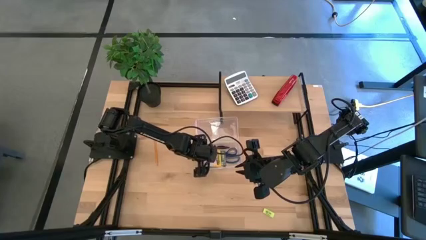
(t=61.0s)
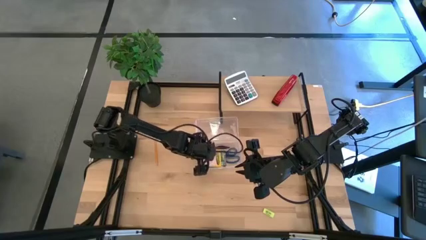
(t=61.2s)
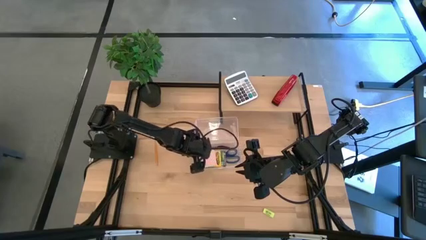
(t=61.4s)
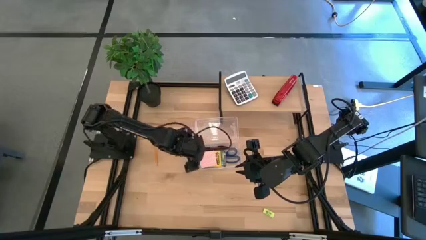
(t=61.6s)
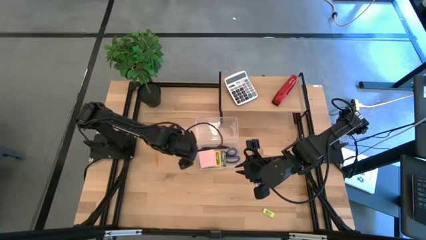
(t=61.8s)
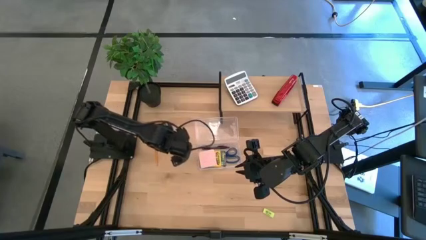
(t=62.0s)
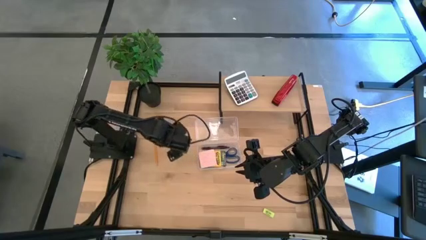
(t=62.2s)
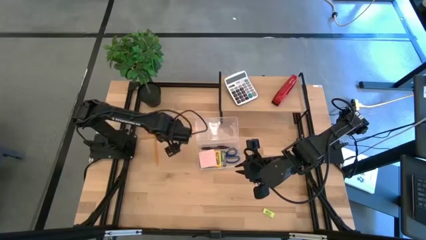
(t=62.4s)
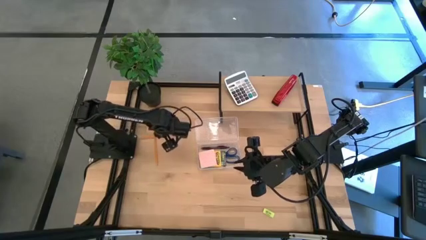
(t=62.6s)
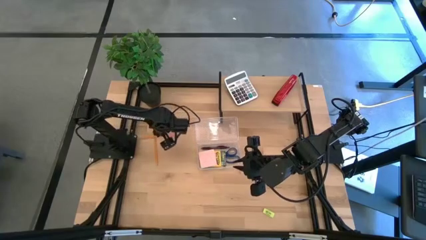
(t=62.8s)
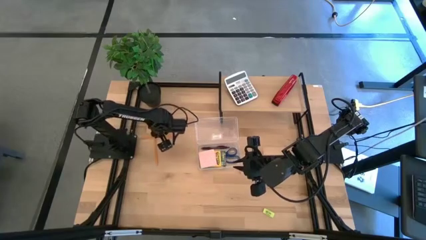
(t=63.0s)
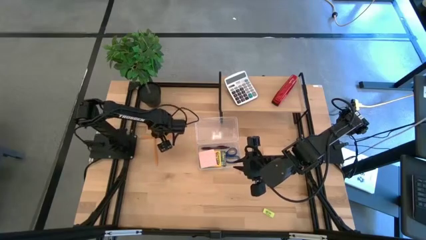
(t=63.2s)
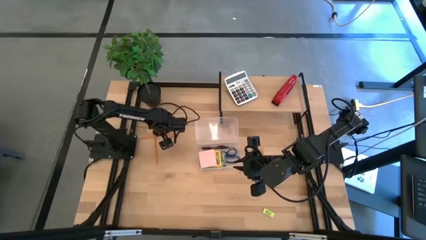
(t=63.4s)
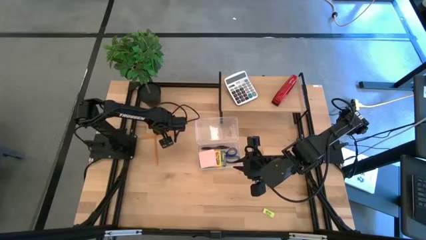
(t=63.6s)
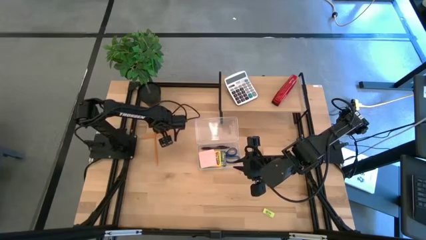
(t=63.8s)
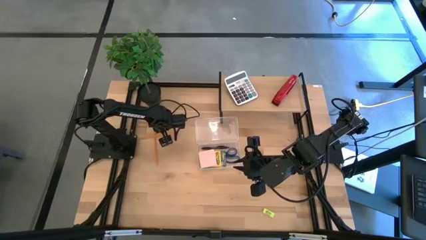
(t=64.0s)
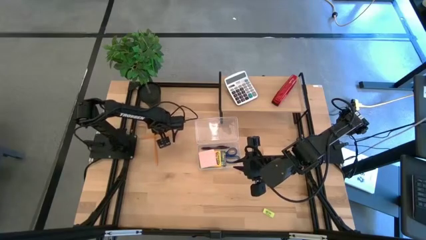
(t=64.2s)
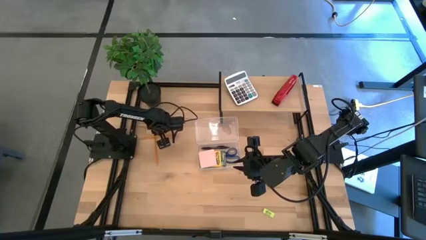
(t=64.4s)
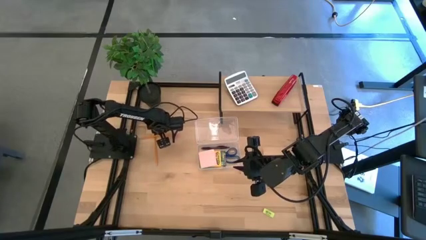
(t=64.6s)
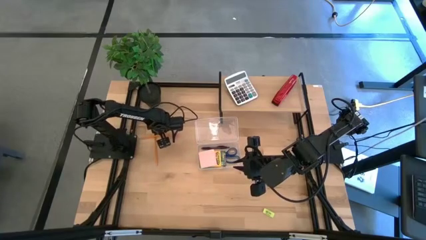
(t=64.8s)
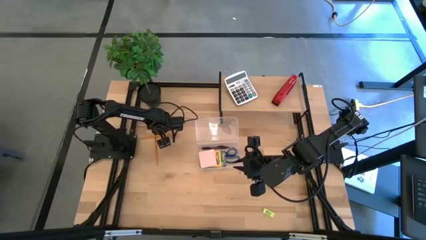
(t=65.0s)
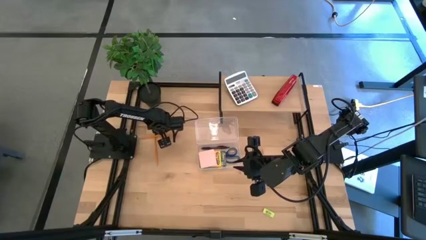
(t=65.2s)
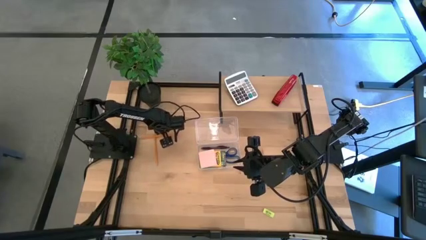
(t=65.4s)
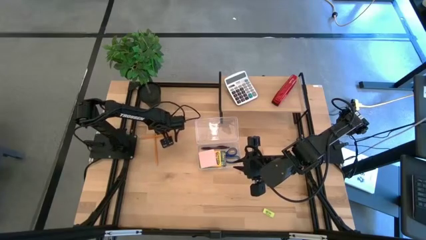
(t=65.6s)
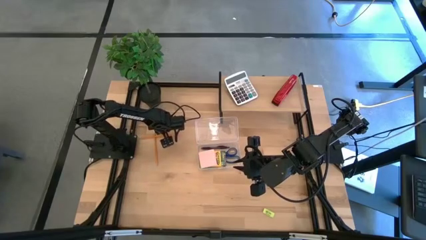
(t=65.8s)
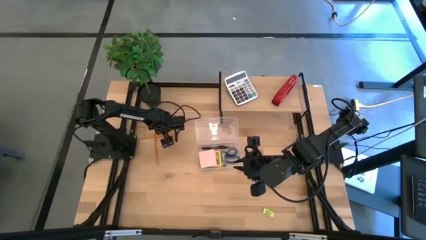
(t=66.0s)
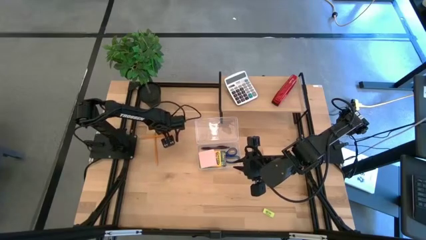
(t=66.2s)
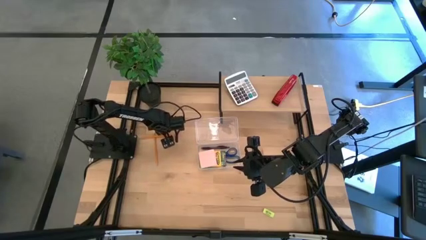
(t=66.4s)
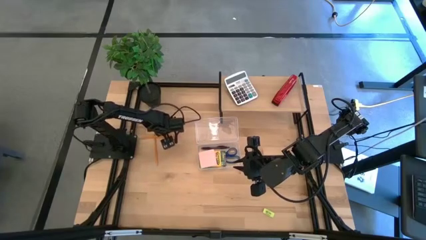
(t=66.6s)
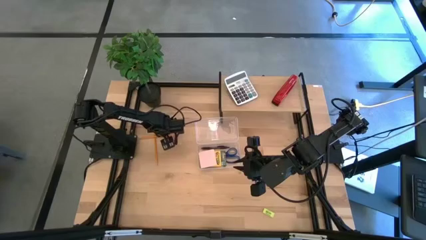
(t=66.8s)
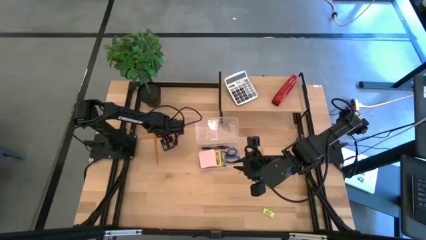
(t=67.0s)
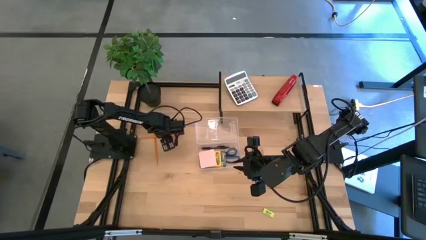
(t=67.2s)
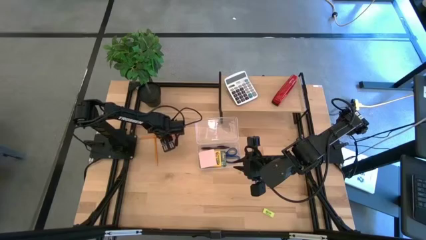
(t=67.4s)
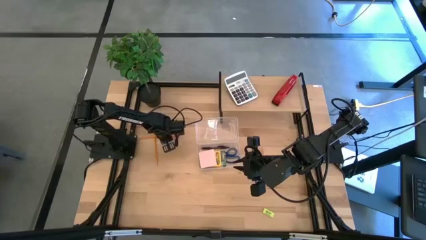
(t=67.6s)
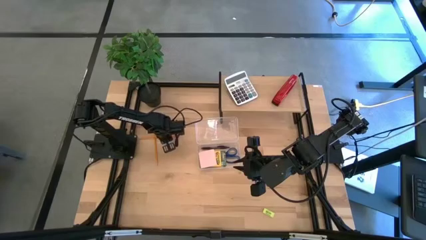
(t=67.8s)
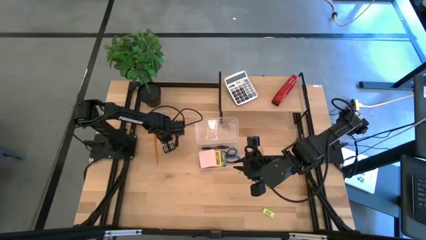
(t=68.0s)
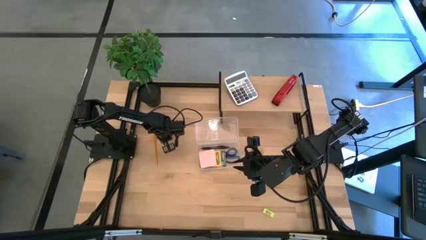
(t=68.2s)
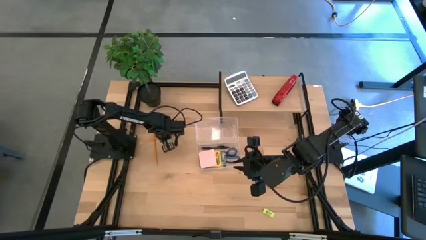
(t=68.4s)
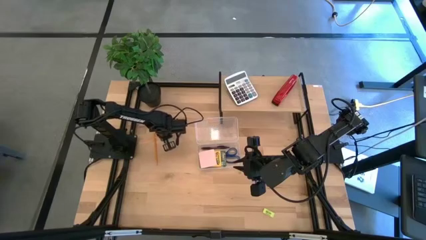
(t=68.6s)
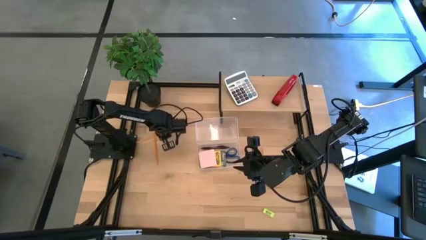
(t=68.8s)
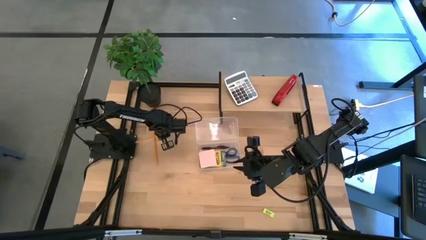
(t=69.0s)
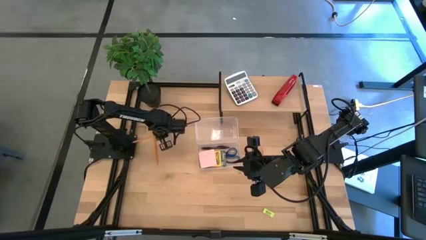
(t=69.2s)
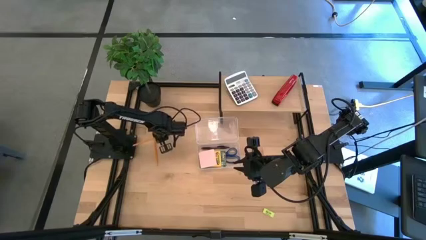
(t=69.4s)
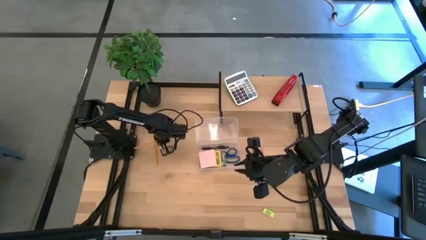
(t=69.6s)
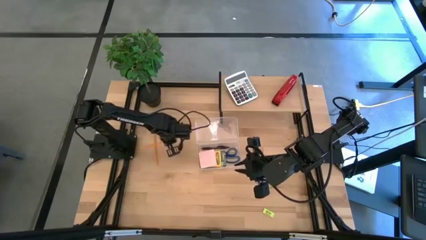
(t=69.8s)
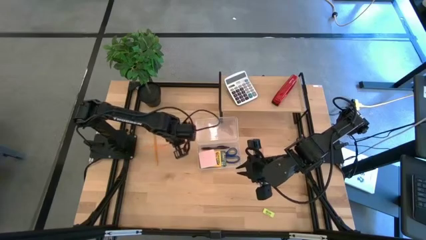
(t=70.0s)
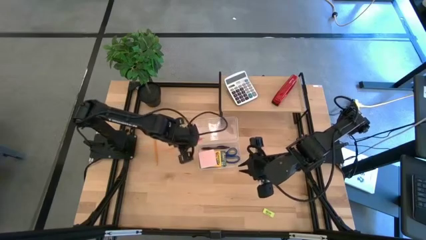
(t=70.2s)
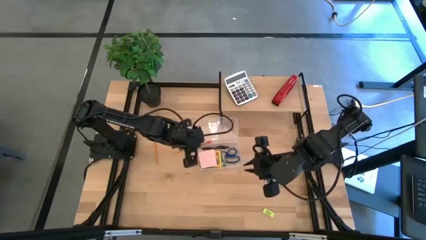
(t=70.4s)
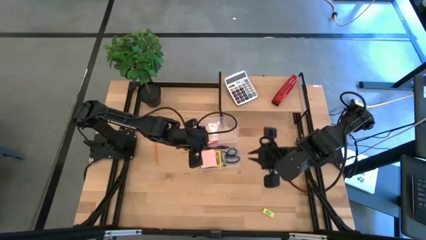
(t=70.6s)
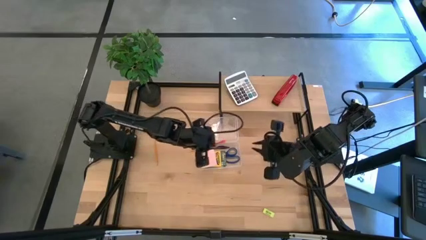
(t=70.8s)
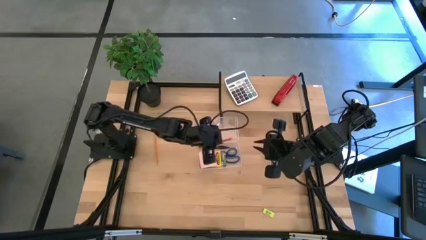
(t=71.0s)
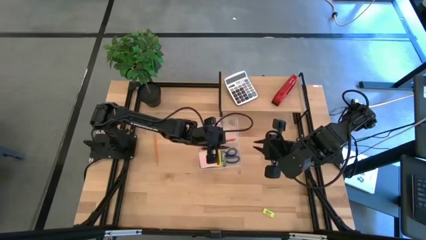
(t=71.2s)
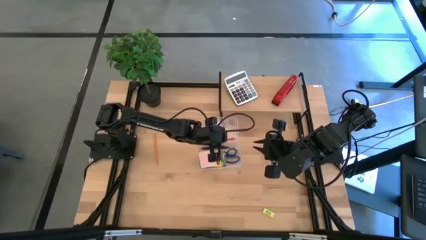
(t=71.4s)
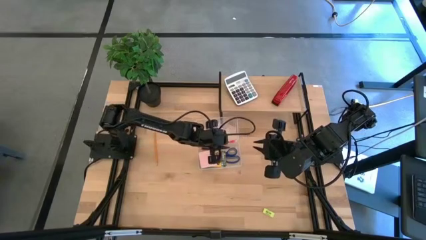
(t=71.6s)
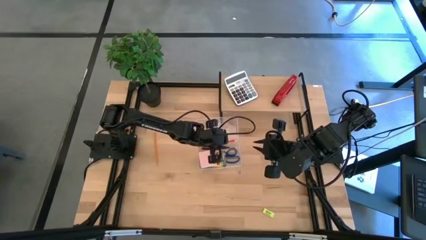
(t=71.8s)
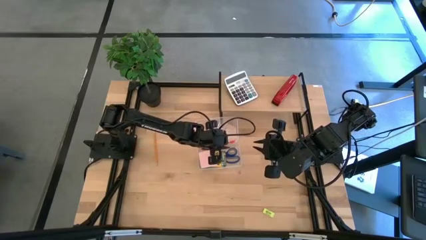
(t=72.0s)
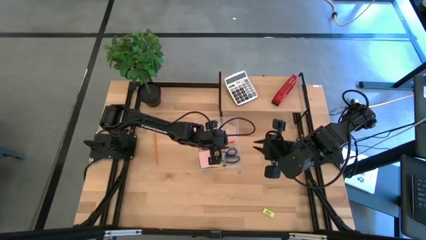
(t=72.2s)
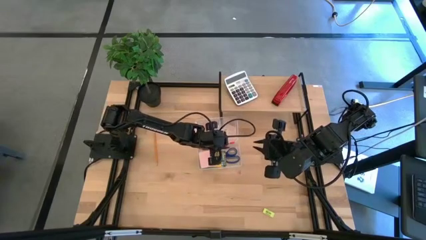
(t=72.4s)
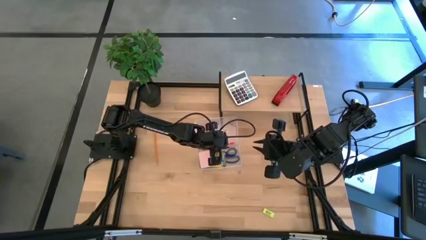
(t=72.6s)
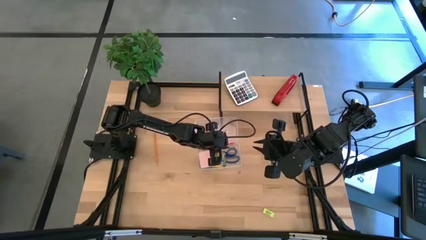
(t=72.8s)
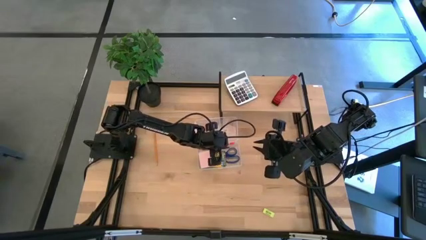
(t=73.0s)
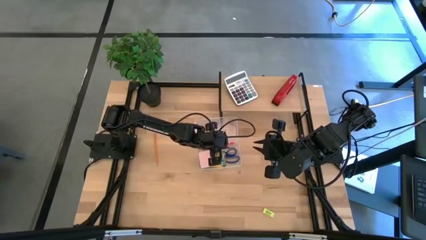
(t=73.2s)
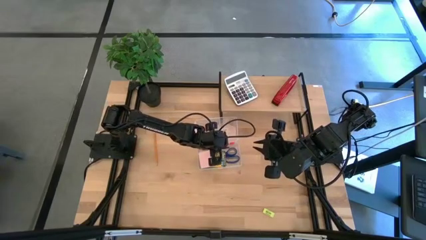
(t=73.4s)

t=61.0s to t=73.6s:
Task: Pack school essentials
Put the orange pencil with the pink eraser into the transparent supply box

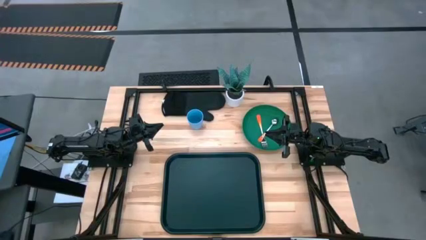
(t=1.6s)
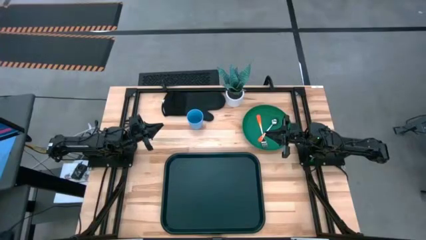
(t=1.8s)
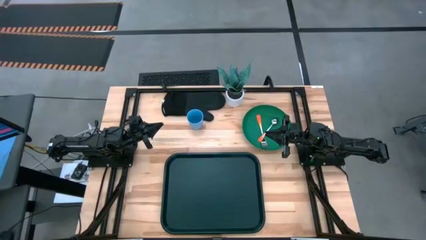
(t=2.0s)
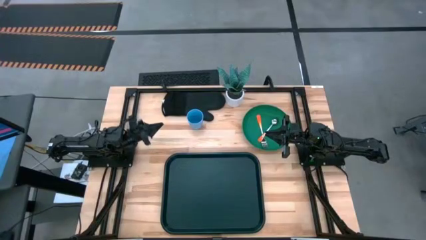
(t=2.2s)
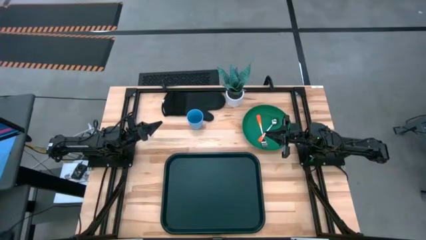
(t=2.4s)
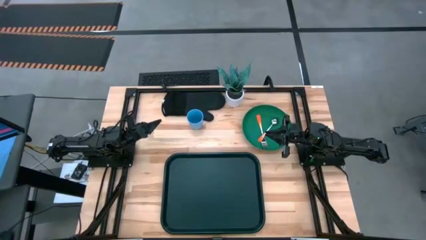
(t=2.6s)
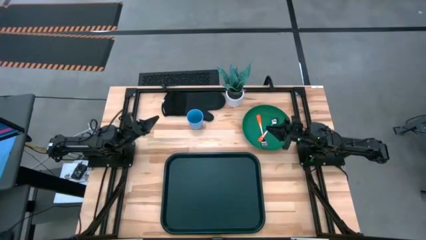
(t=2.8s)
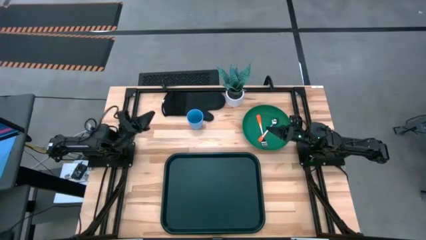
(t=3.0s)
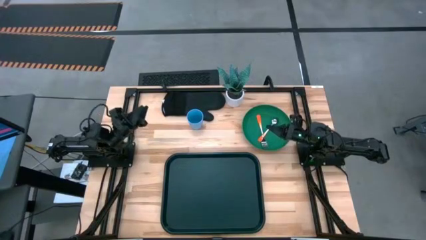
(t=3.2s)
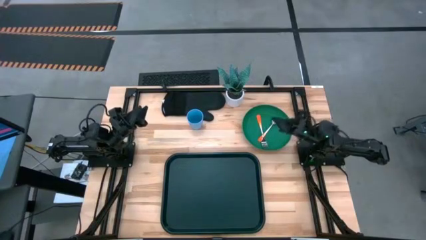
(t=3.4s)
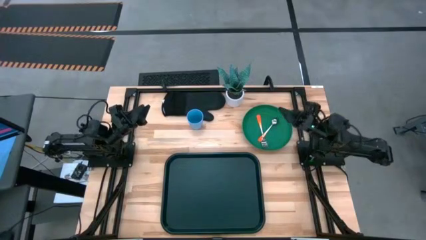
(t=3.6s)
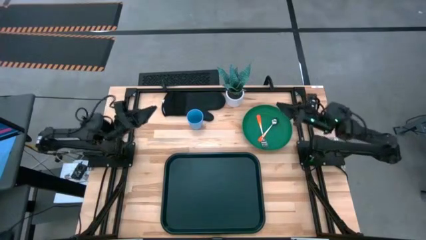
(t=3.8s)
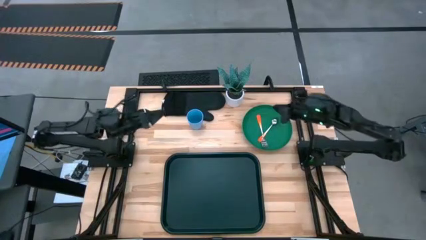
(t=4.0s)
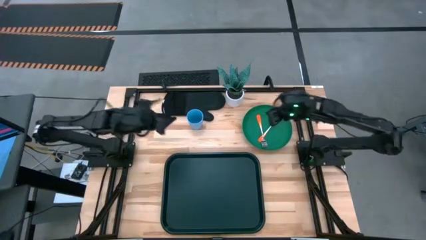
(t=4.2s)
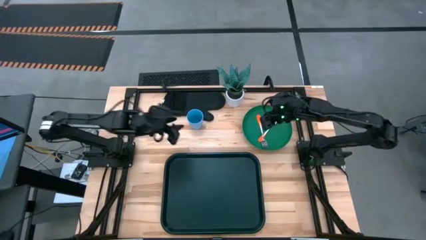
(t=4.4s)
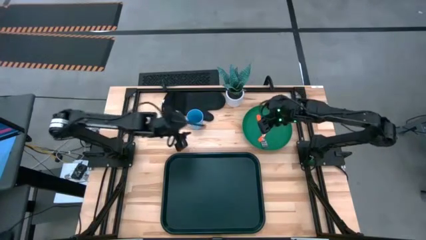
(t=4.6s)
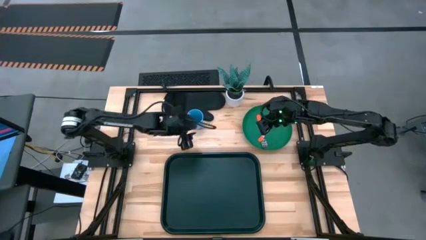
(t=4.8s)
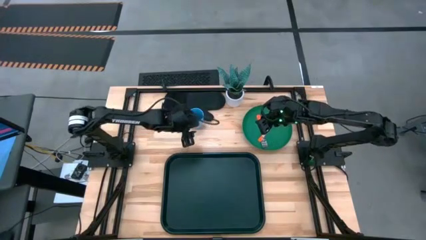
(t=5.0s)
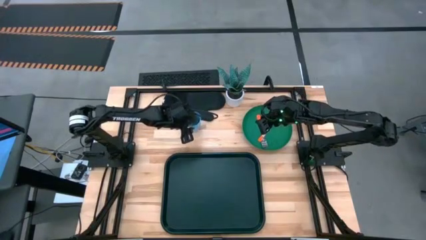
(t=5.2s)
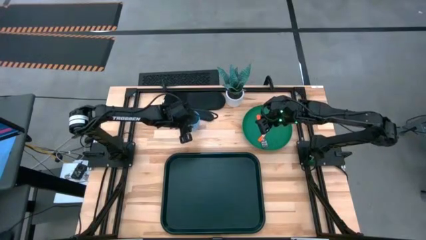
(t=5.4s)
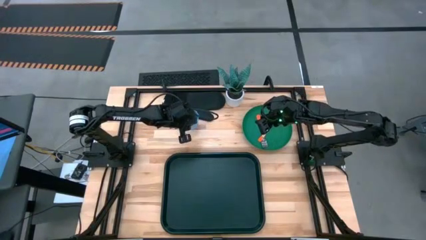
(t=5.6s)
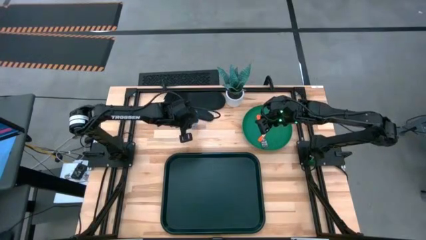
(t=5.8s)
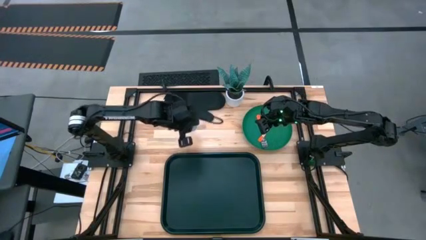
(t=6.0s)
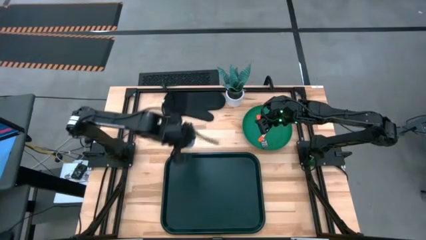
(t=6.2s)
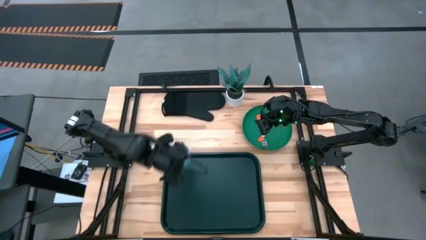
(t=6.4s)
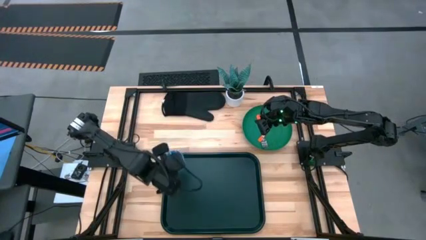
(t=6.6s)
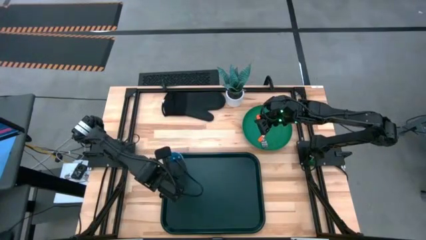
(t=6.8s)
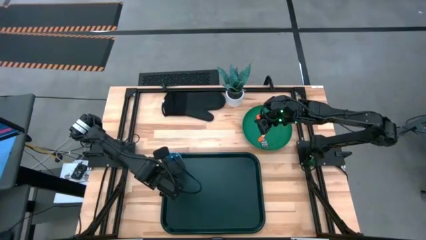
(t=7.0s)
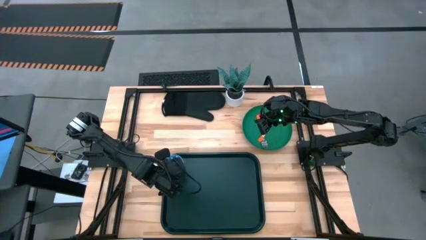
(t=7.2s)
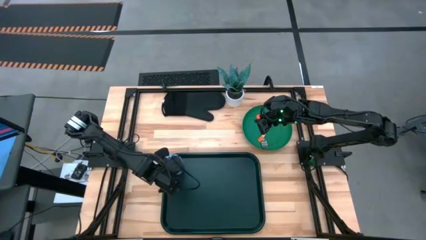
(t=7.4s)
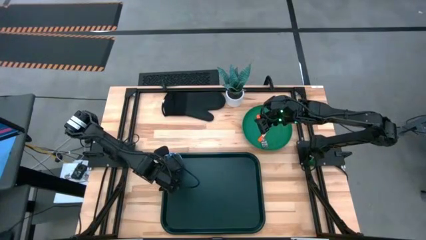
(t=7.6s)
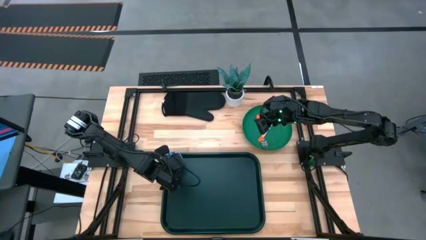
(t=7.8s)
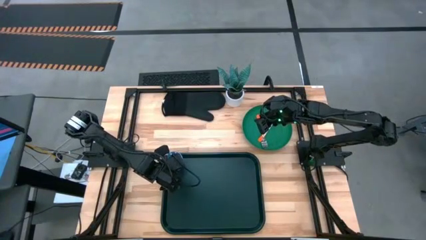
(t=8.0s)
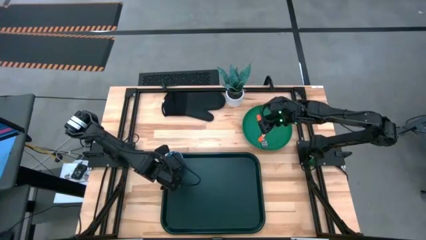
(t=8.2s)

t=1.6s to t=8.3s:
Task: Pick and place plate/cup/fork/spoon on tray
Put the blue cup on the top left of the serving tray
